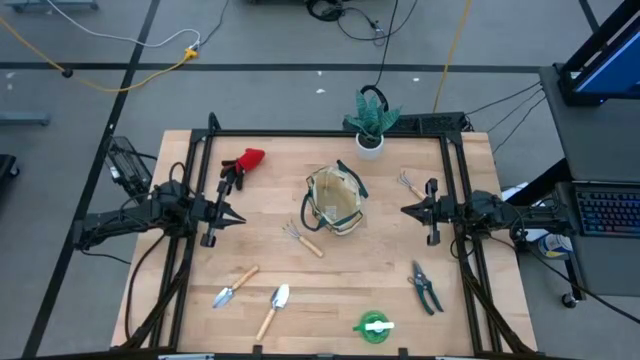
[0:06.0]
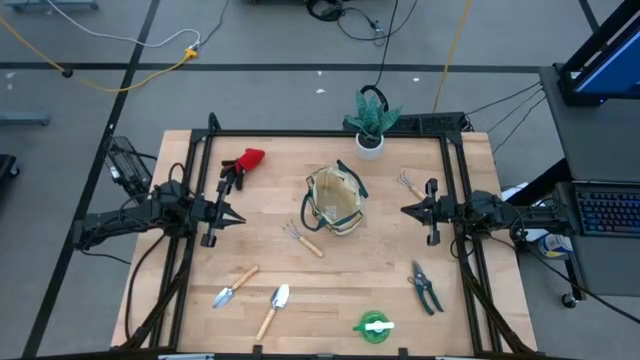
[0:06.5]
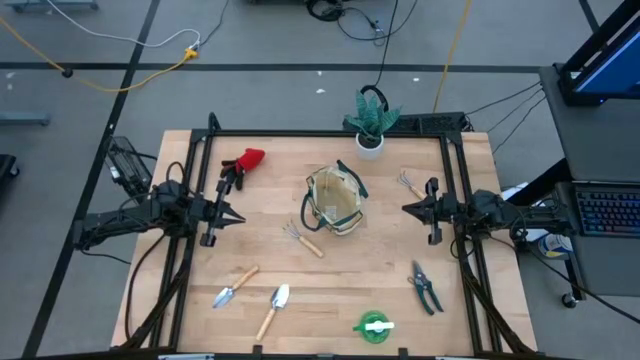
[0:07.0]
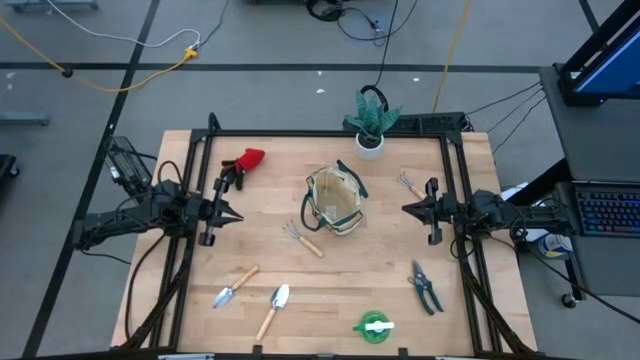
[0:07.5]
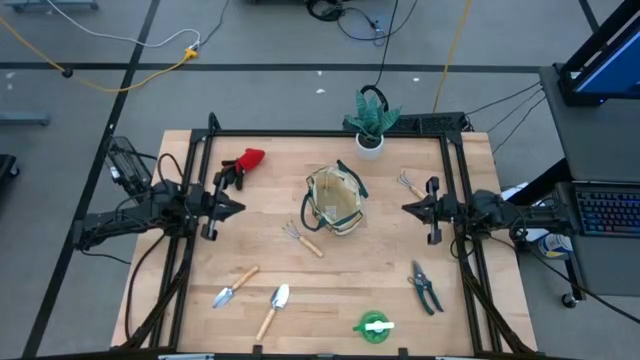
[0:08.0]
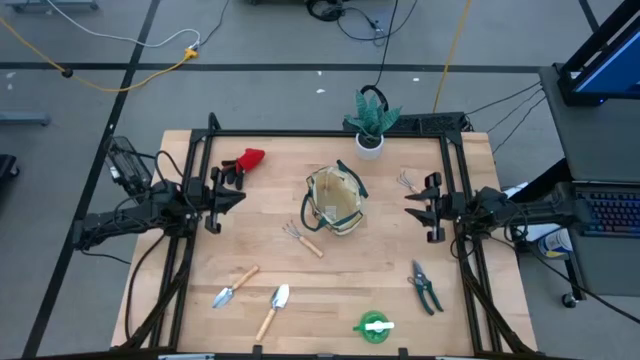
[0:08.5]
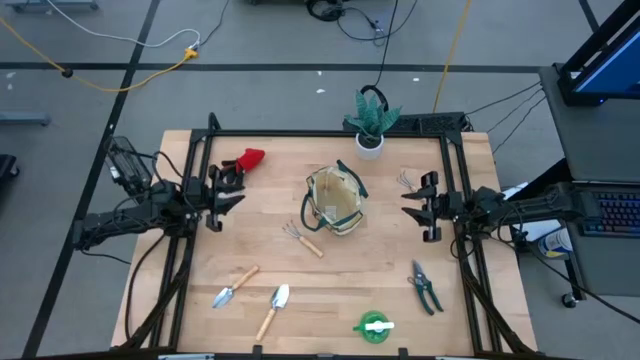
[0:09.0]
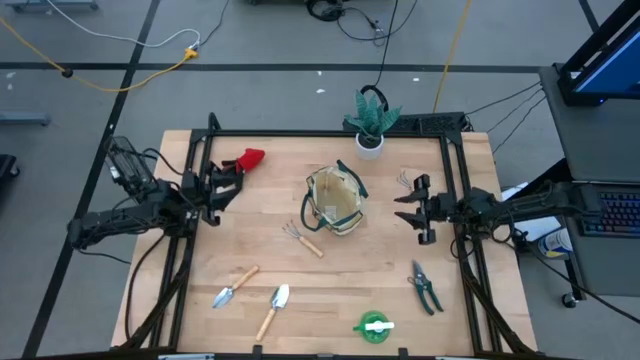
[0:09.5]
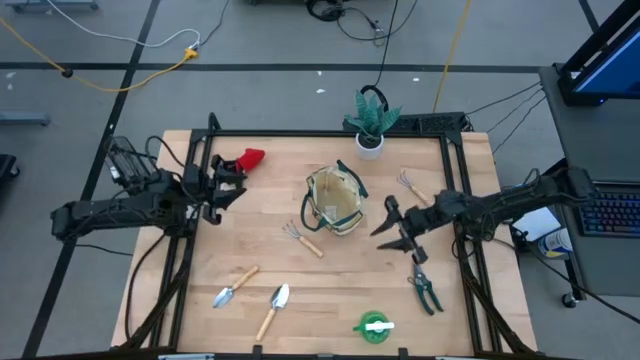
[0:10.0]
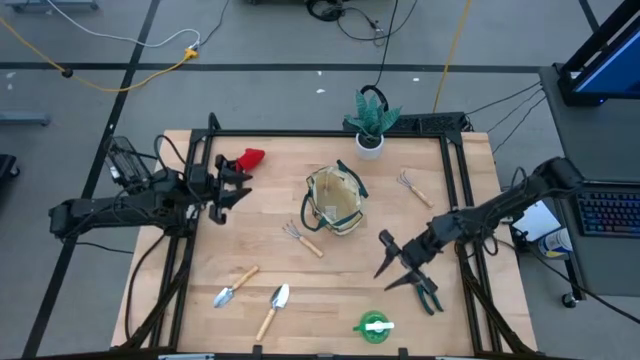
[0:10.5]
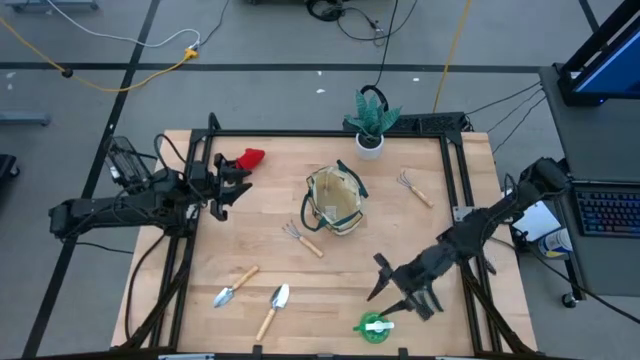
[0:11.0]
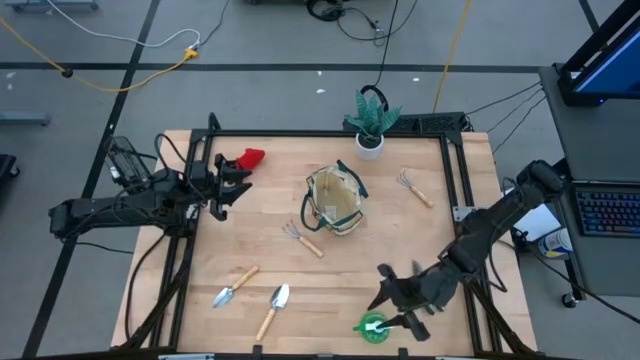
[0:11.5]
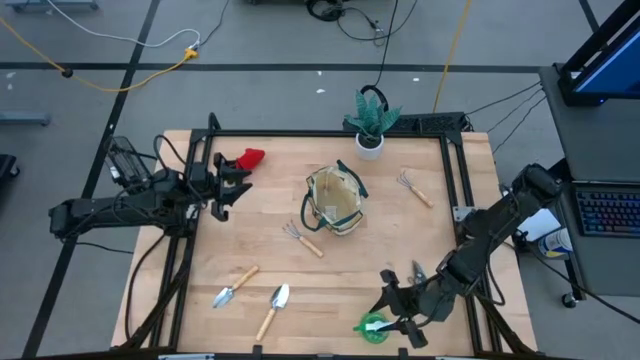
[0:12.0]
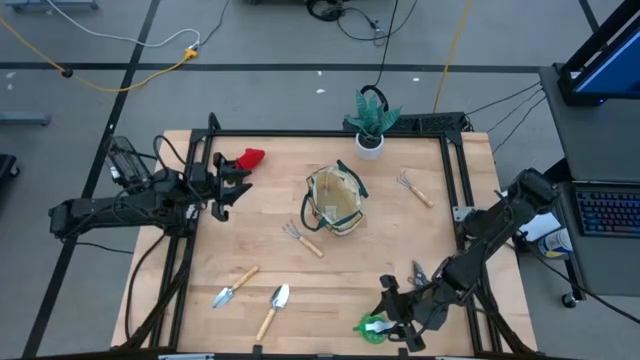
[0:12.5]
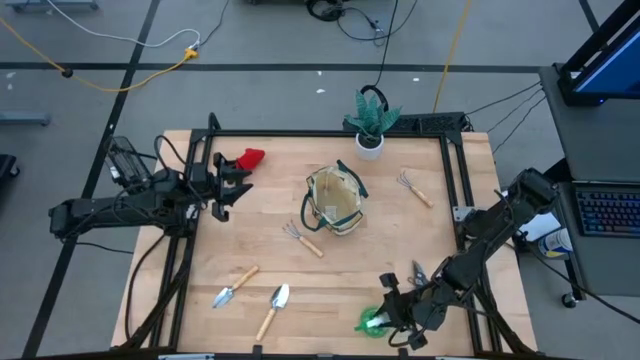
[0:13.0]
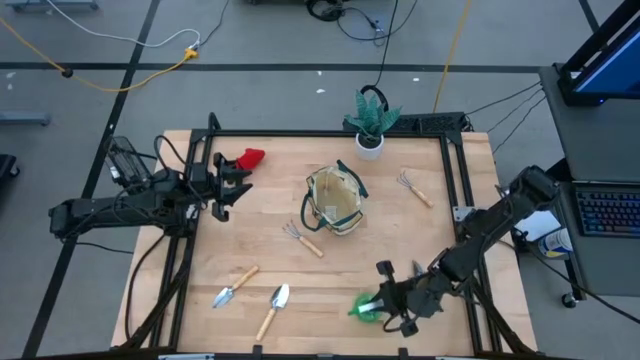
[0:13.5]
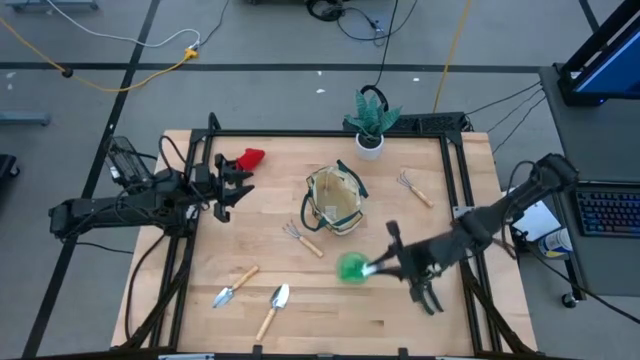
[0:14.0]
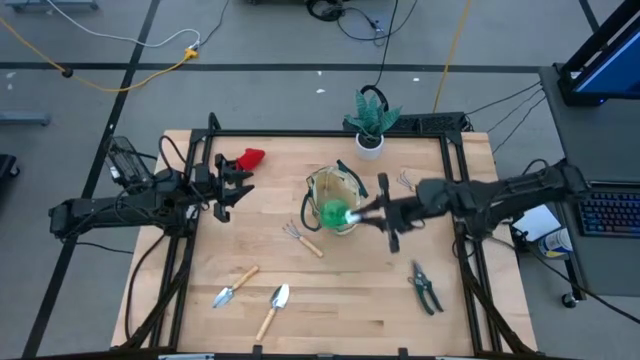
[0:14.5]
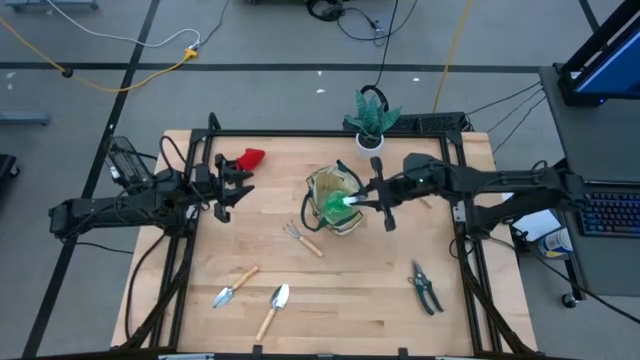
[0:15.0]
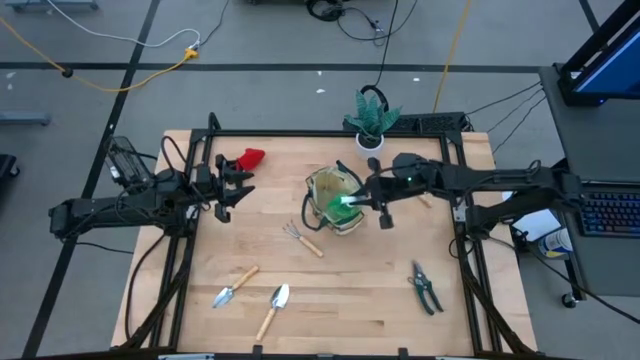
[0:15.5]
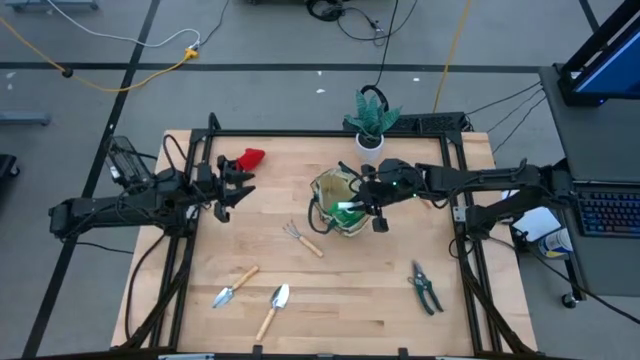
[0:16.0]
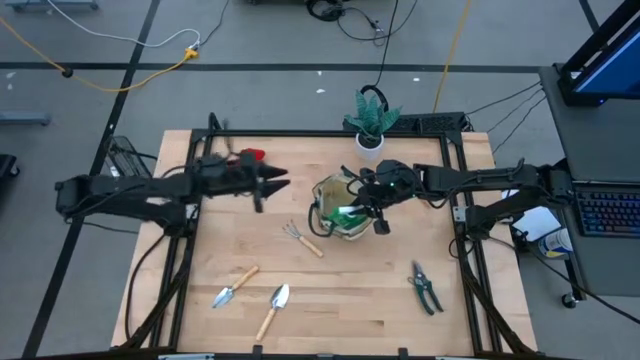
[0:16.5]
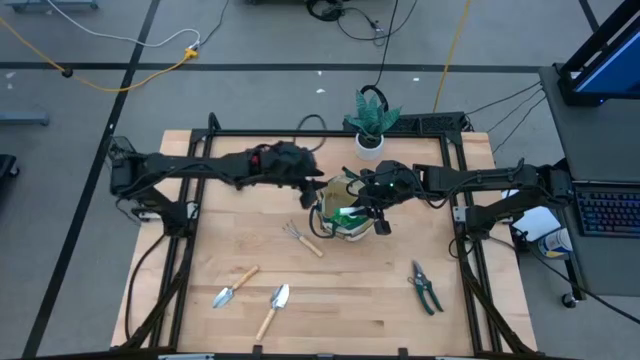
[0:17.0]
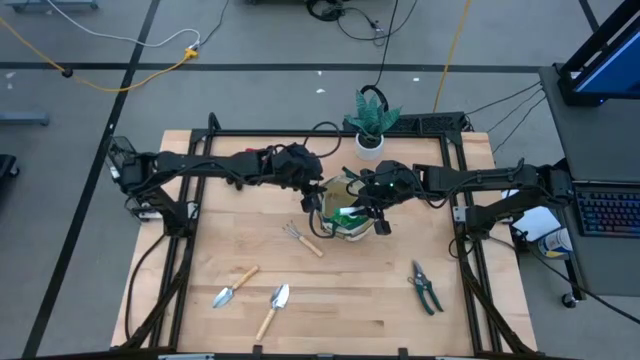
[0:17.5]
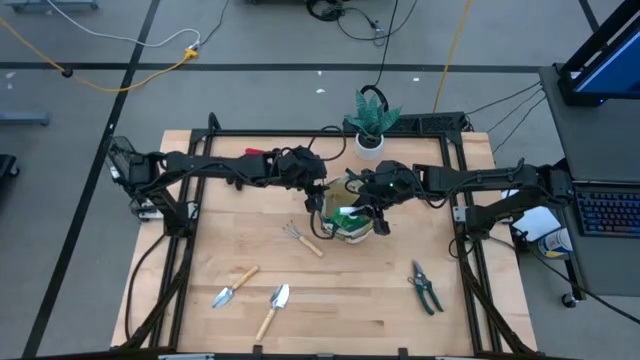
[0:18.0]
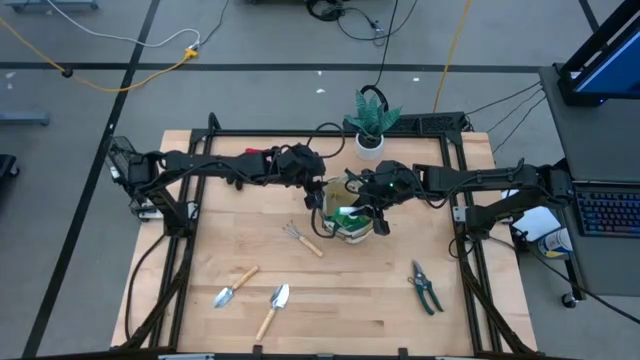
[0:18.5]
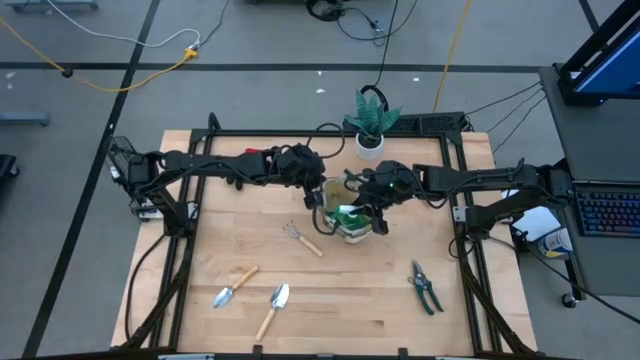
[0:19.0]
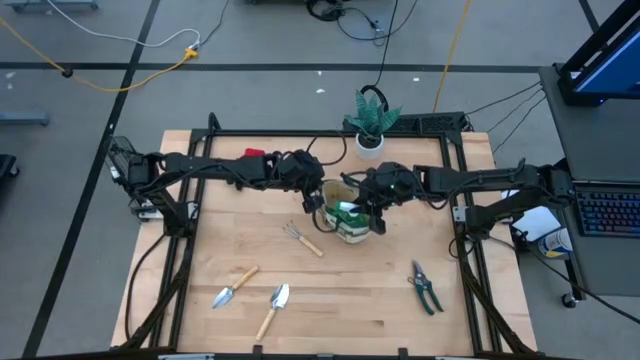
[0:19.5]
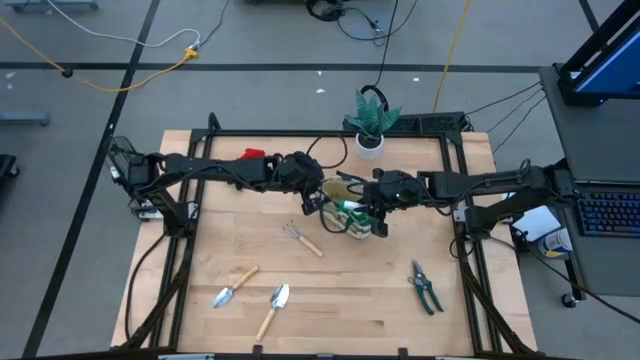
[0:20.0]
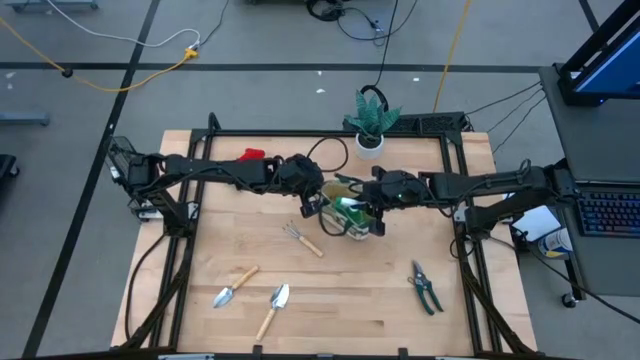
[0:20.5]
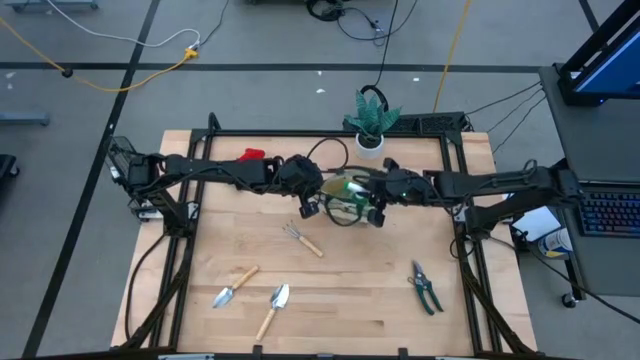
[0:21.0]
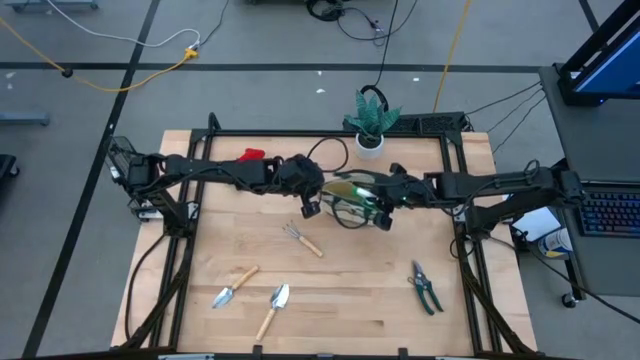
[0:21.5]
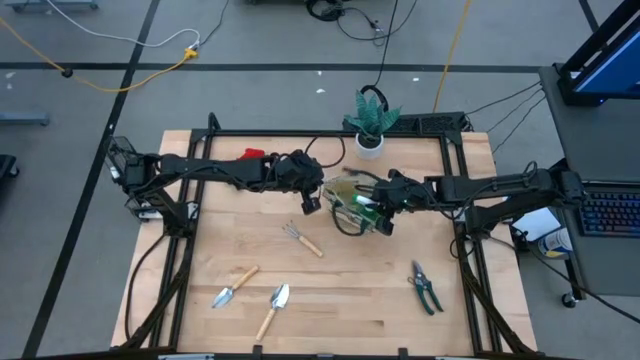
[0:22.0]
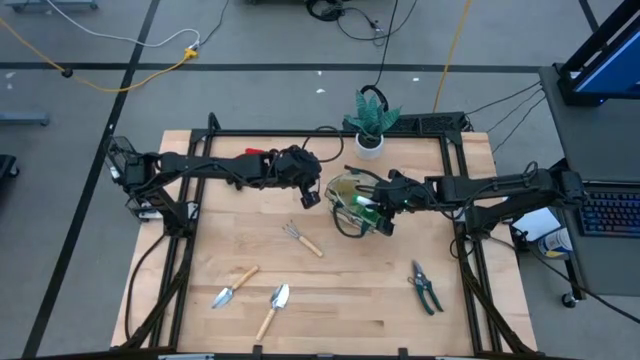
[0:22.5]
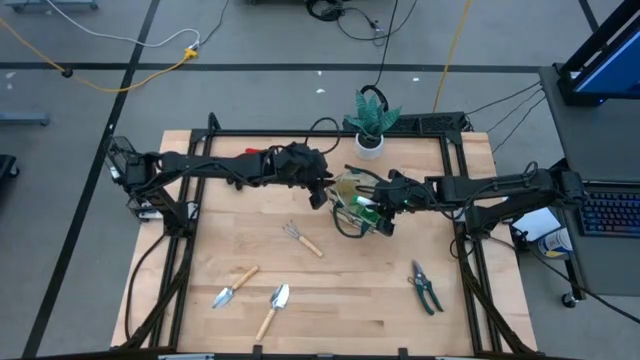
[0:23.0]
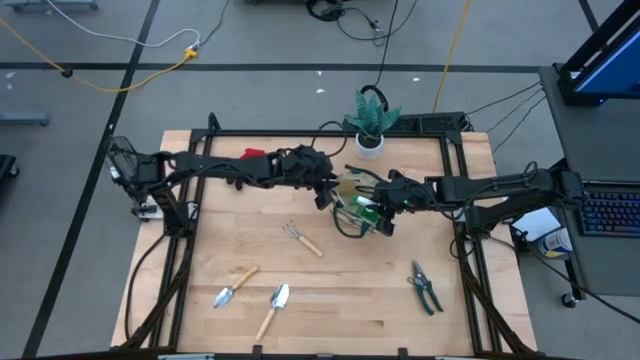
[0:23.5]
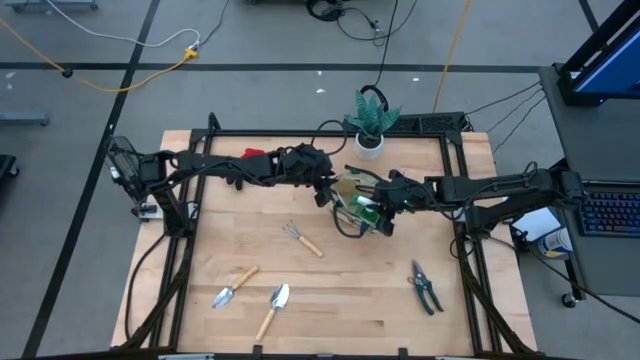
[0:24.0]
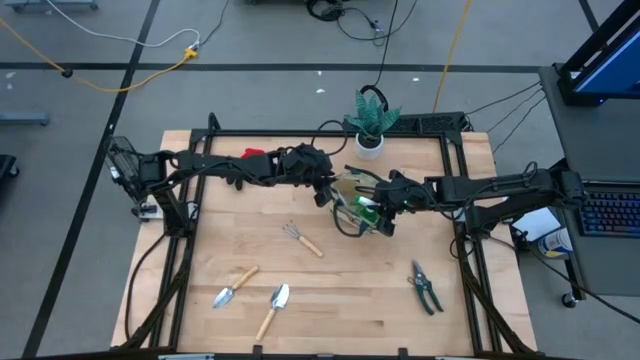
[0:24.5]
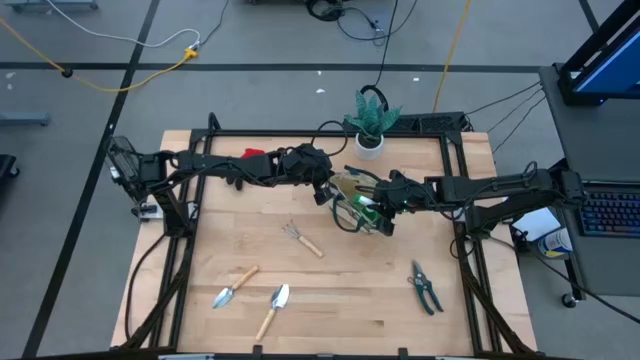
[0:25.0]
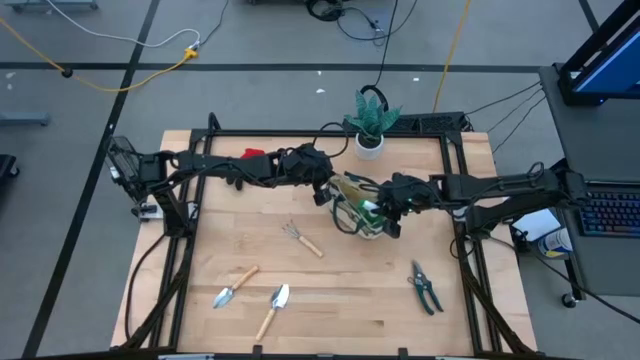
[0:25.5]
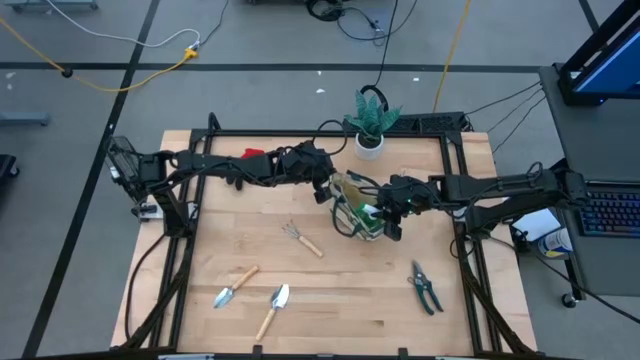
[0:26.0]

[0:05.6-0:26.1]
Task: Pick & Place Garden tools in Gardening bag
Put the green spray bottle into the gardening bag
